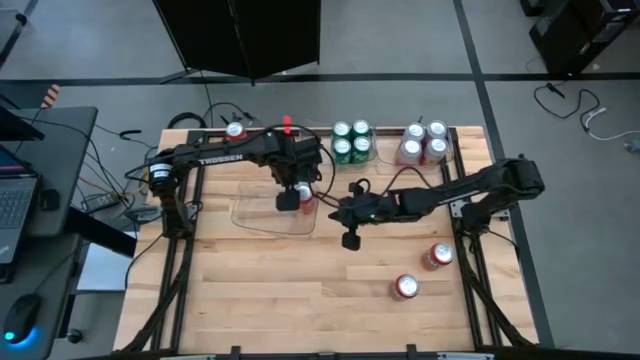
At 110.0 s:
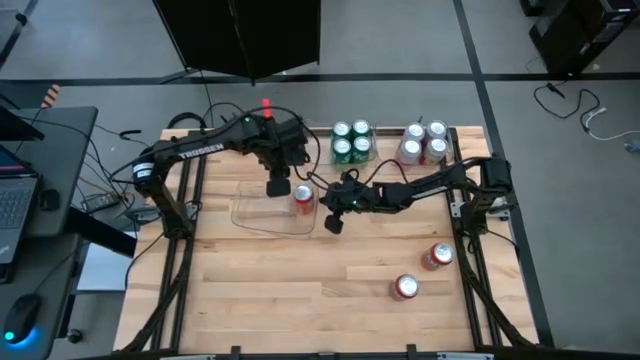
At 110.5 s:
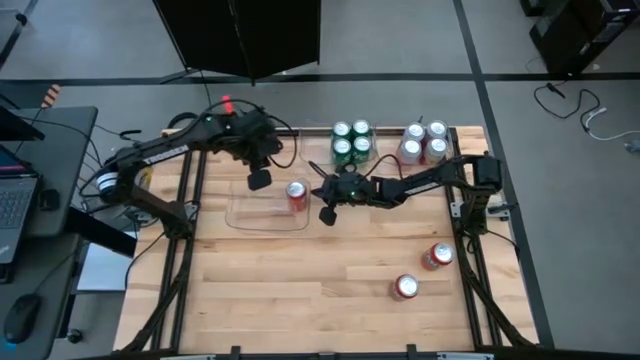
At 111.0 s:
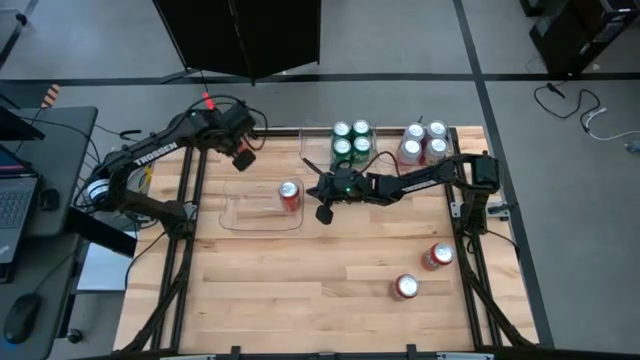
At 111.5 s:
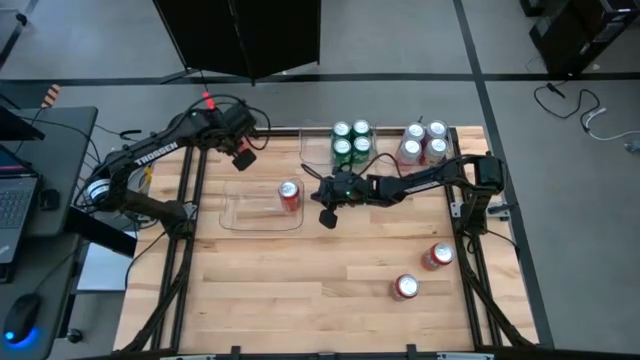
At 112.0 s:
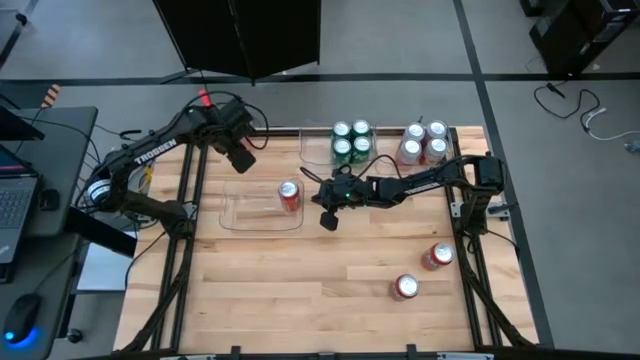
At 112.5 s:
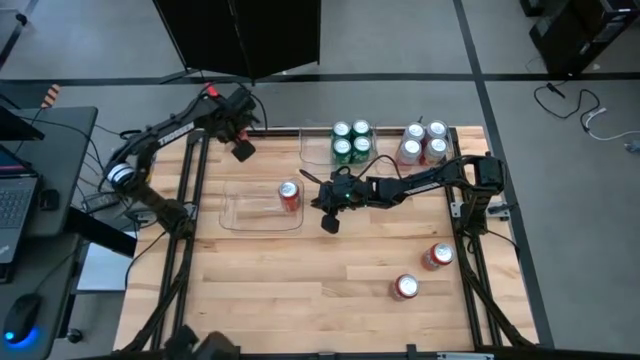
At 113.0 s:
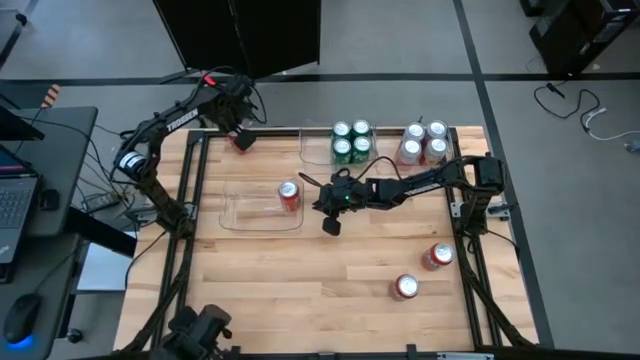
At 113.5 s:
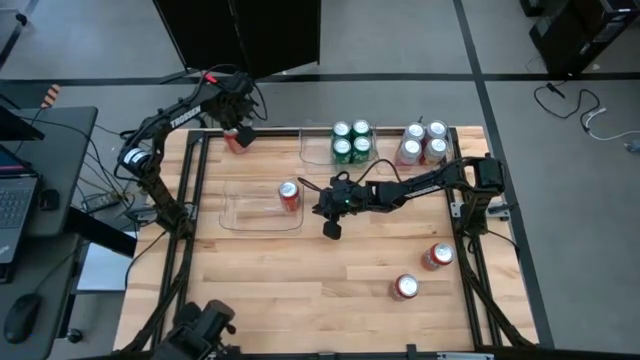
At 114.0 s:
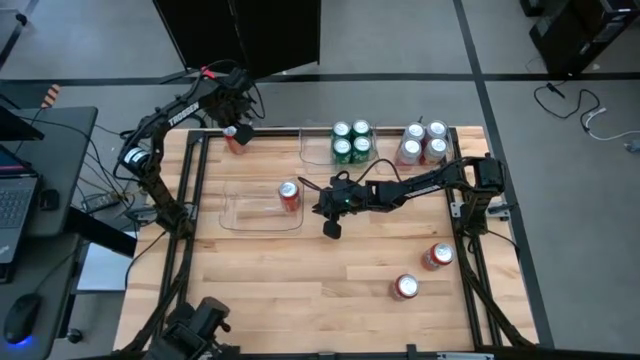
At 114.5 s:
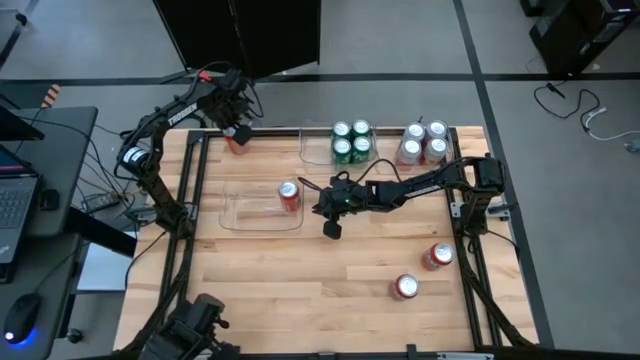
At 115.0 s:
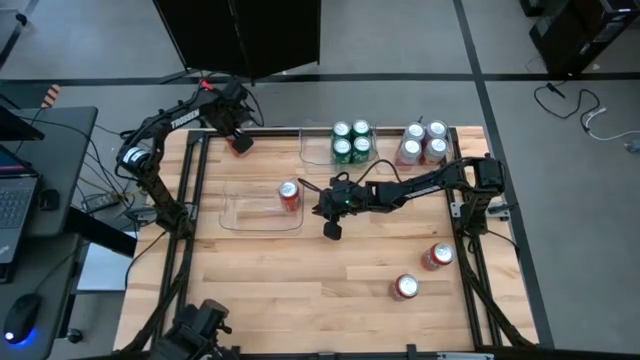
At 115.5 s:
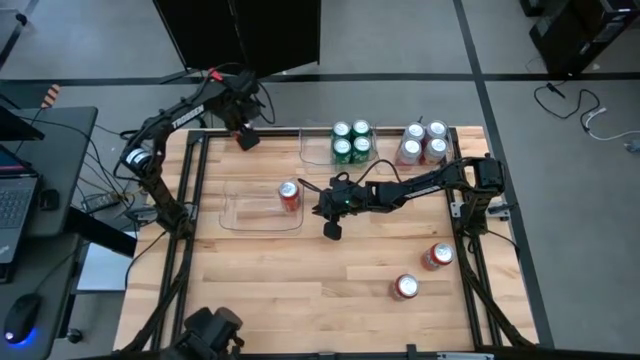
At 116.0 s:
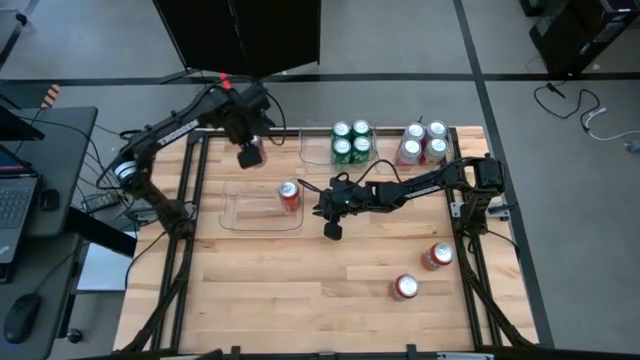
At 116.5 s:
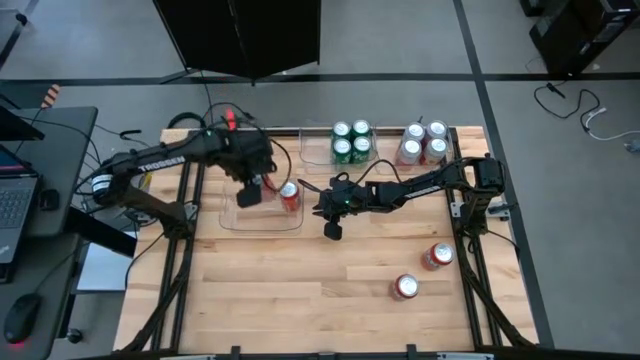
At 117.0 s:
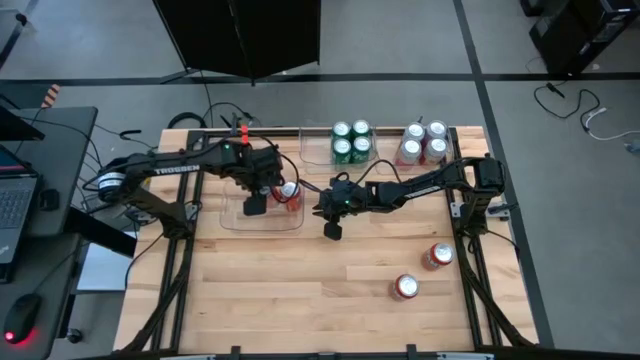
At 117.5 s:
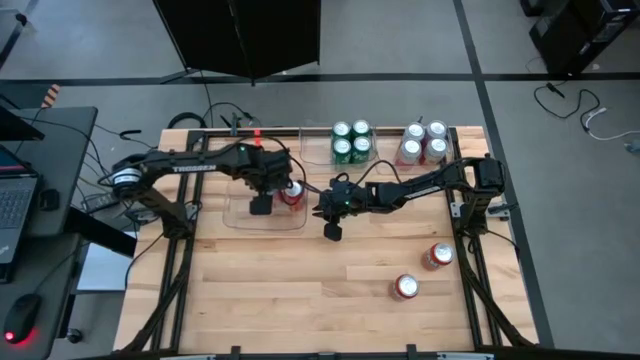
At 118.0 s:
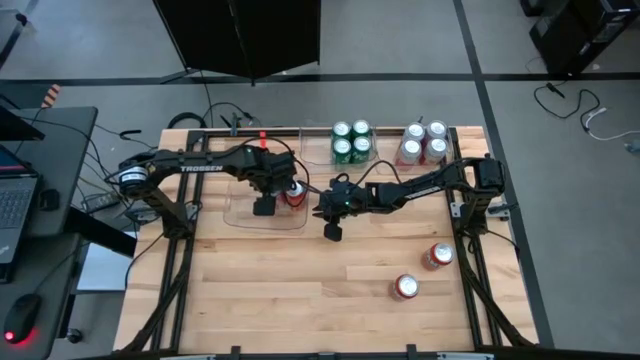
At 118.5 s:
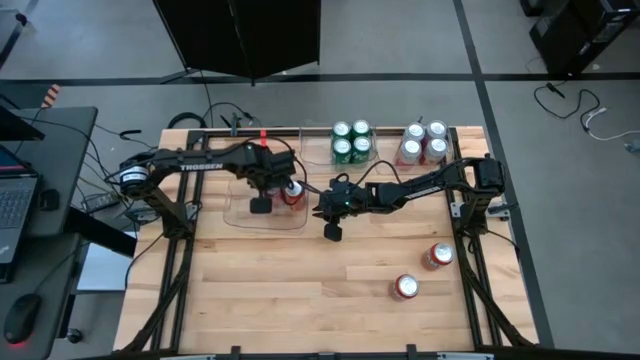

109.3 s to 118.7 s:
Task: Sort soda cans
Put the top red soda can into the bottom transparent bin

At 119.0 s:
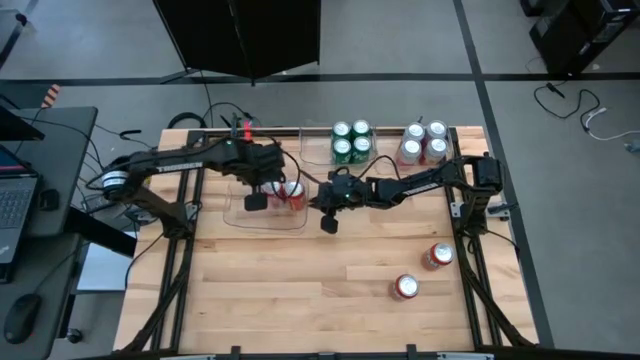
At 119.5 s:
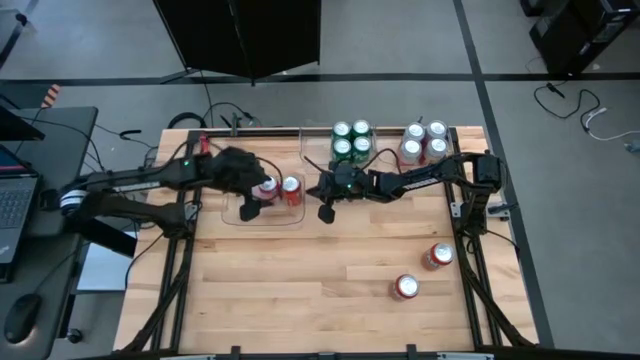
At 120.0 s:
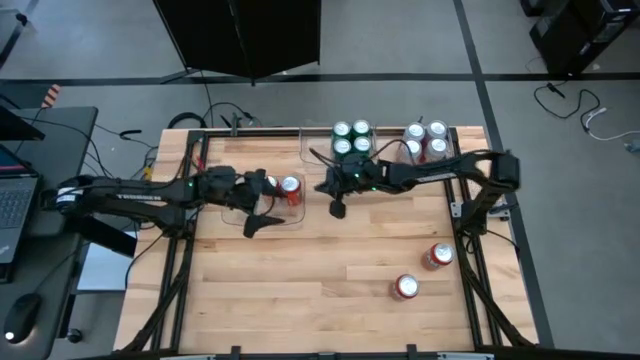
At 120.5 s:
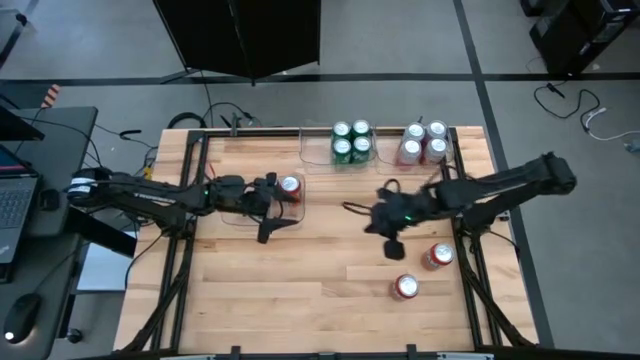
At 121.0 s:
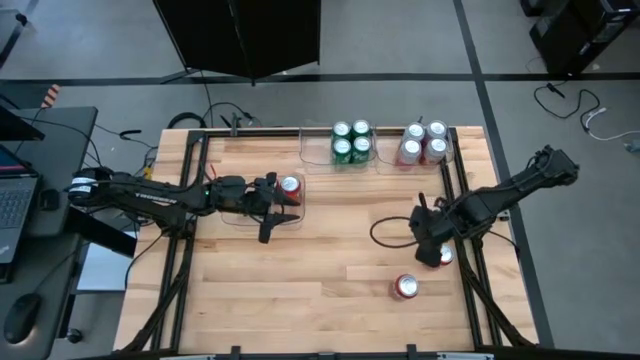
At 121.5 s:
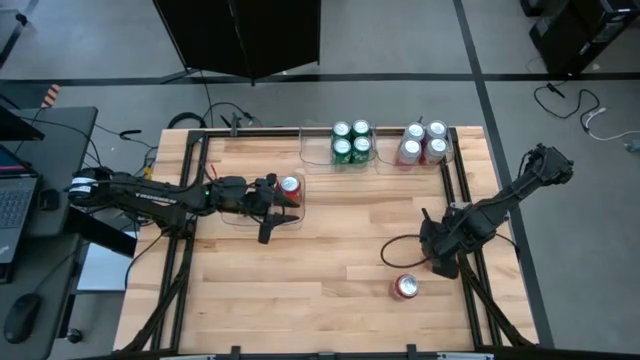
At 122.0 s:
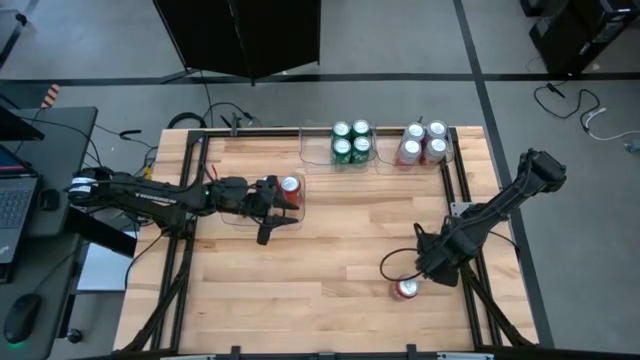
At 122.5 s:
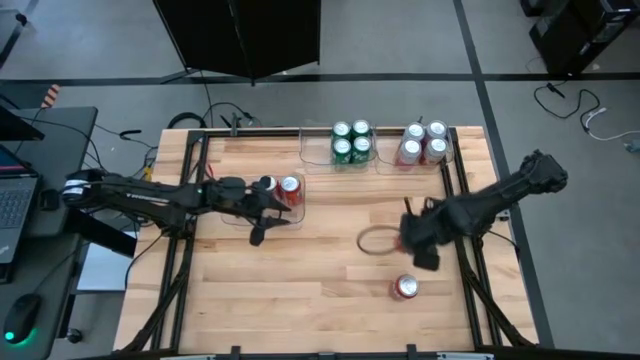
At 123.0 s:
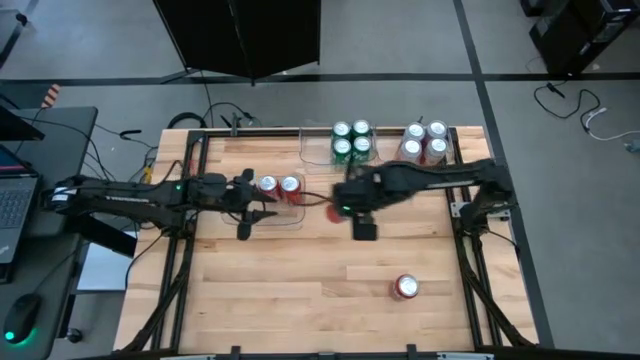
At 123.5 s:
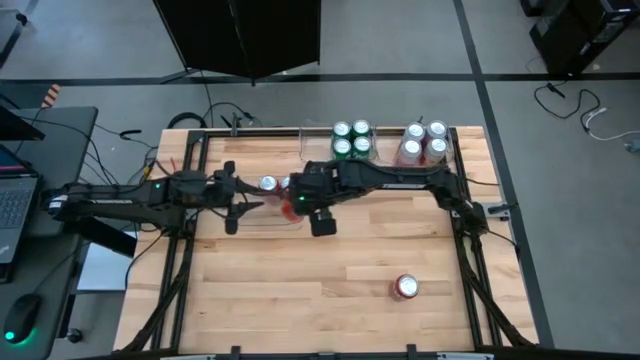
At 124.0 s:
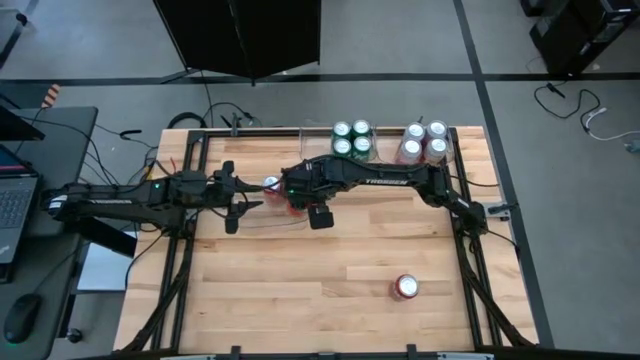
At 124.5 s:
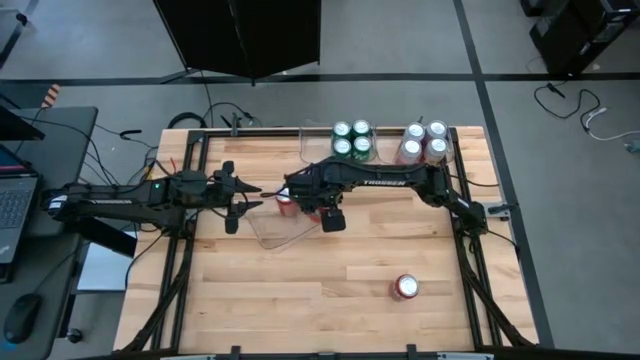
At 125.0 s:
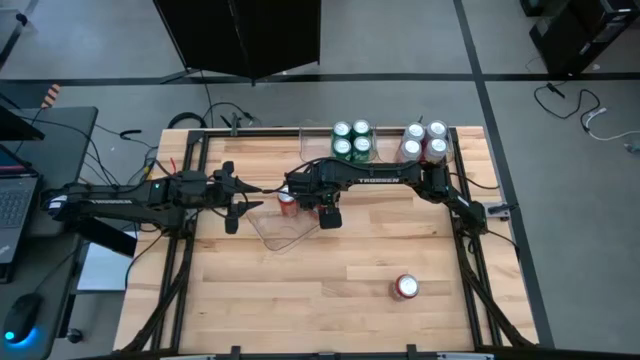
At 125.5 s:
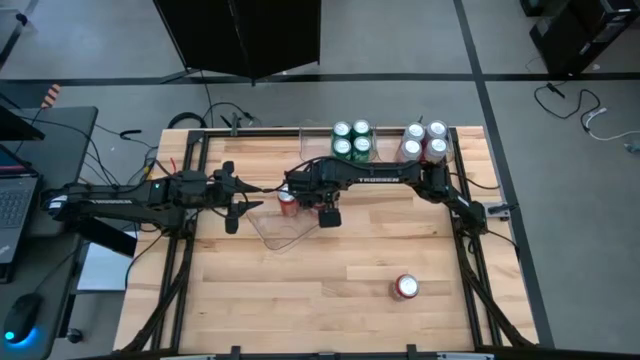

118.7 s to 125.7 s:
Put the top red soda can into the bottom transparent bin

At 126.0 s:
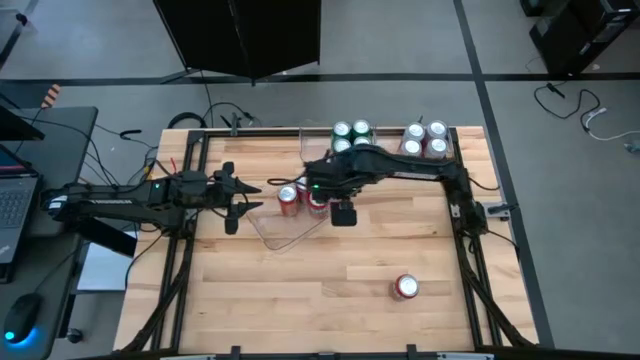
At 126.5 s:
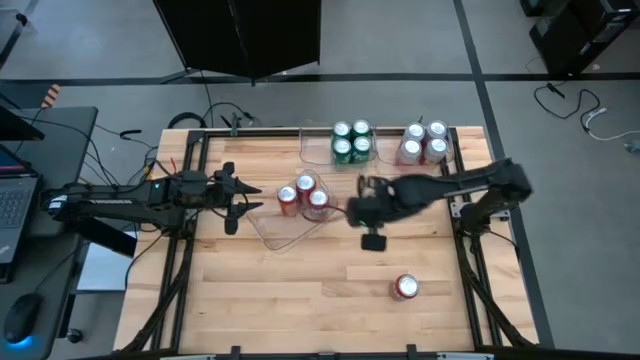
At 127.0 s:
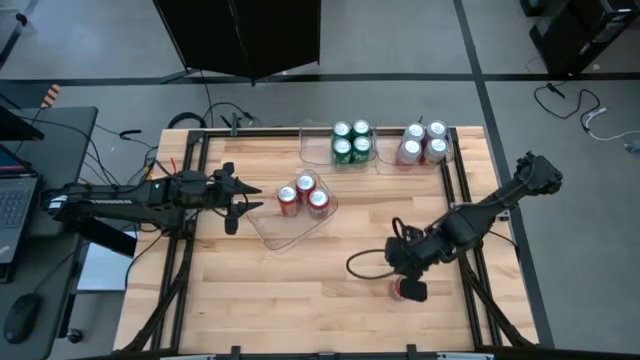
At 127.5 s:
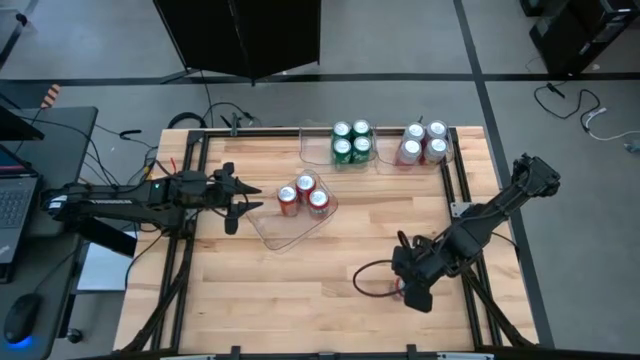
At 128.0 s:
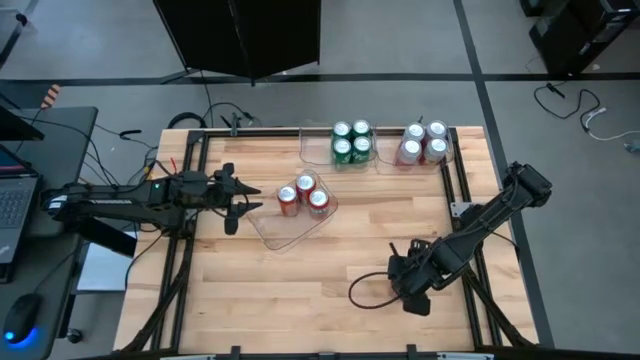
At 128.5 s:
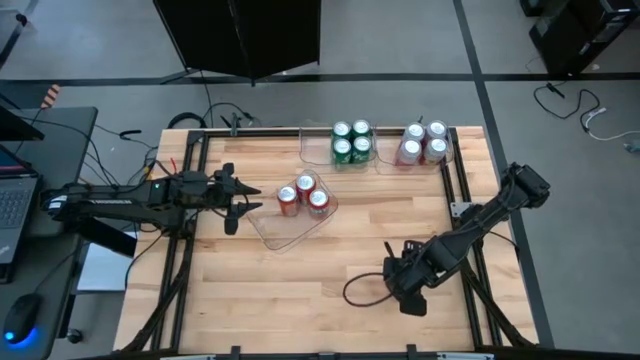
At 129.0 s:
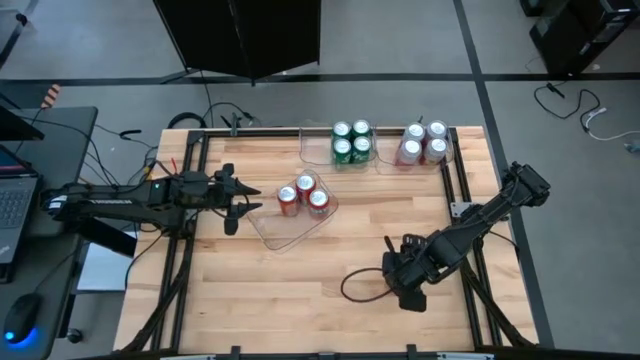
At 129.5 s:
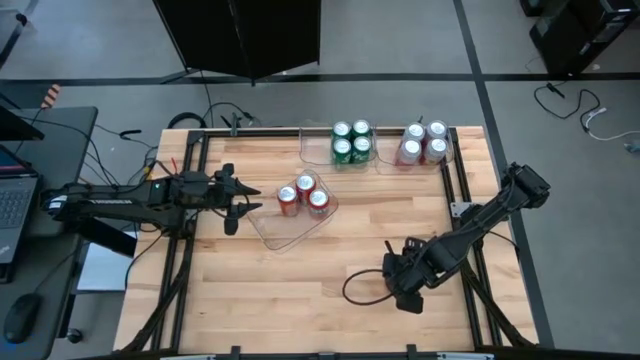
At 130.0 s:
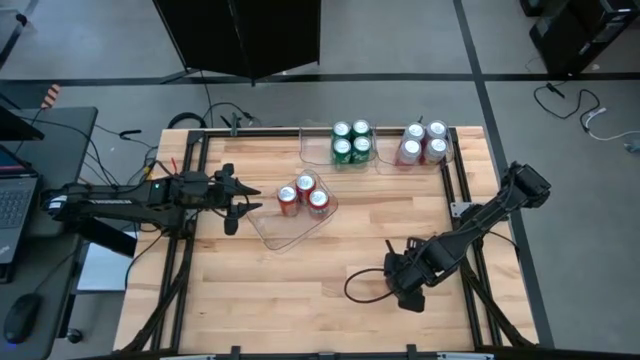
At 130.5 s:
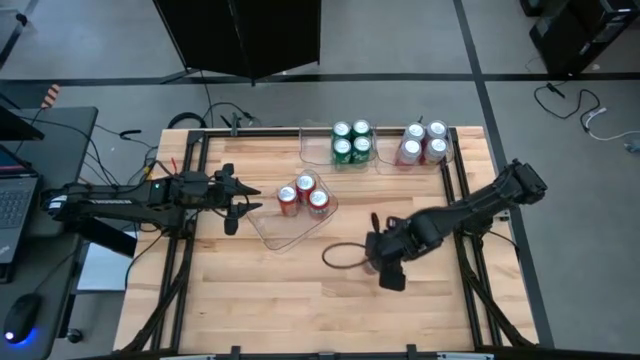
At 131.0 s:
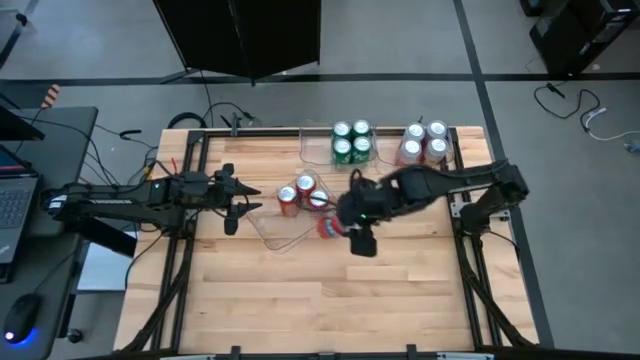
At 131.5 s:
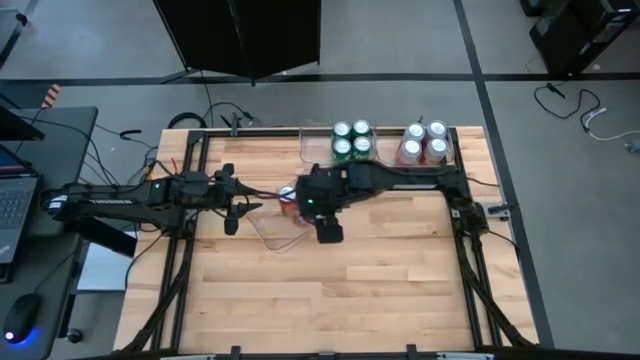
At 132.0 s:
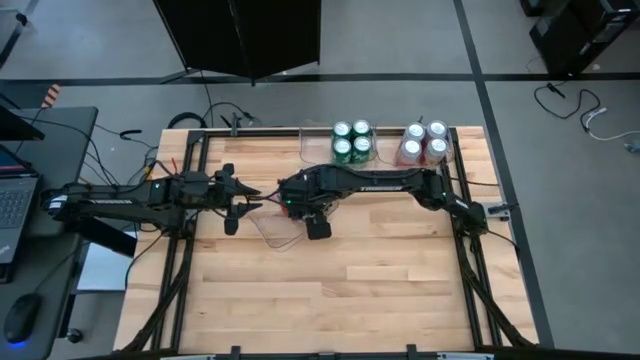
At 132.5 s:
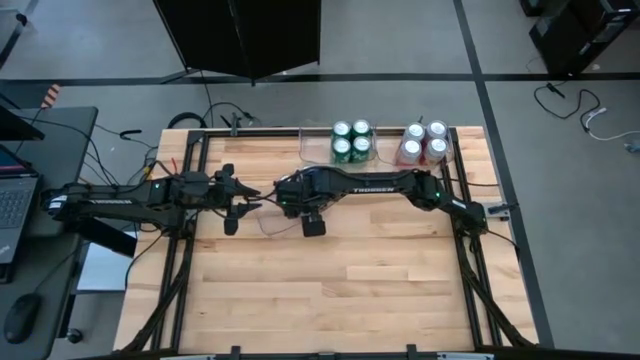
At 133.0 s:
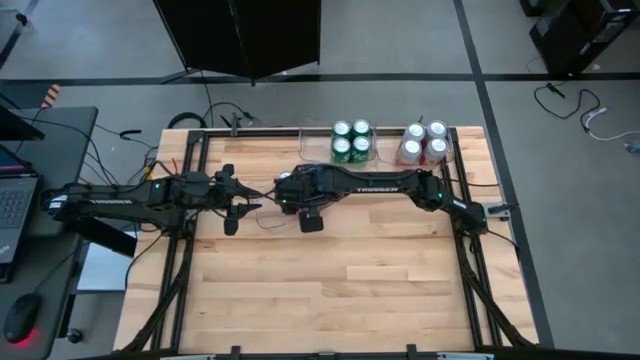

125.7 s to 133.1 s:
Put the red soda can into the bottom transparent bin
